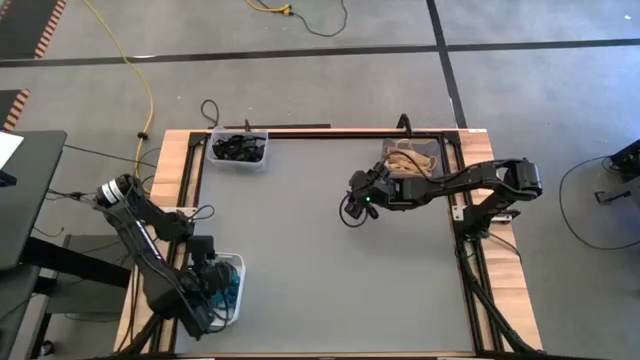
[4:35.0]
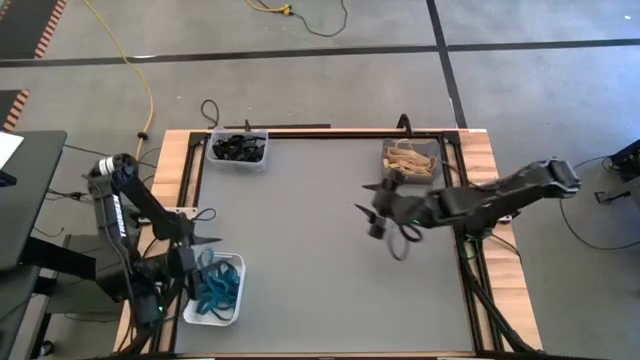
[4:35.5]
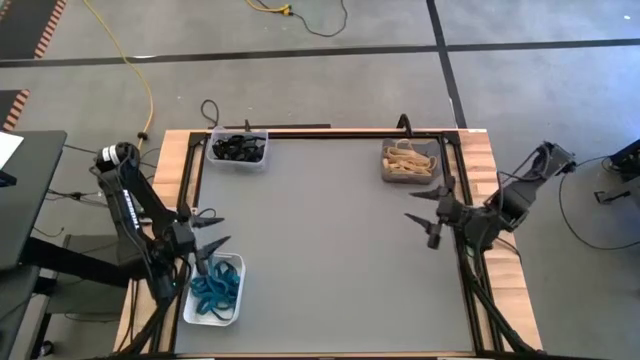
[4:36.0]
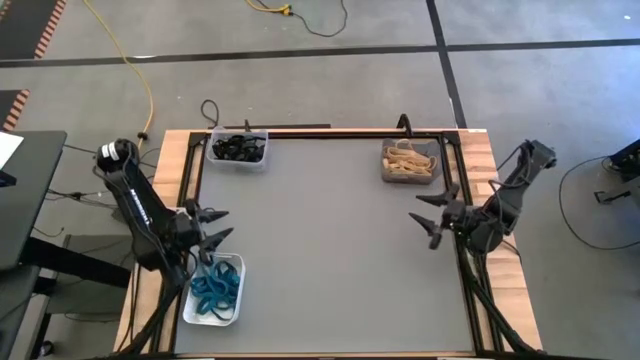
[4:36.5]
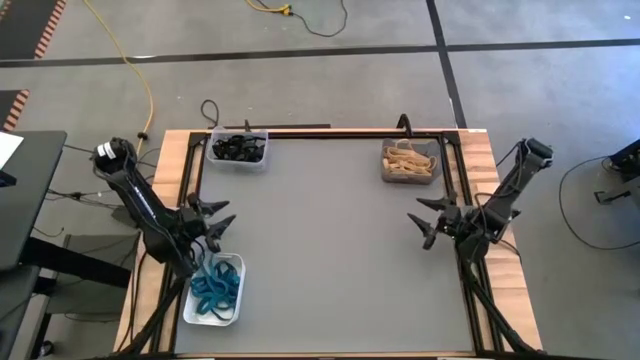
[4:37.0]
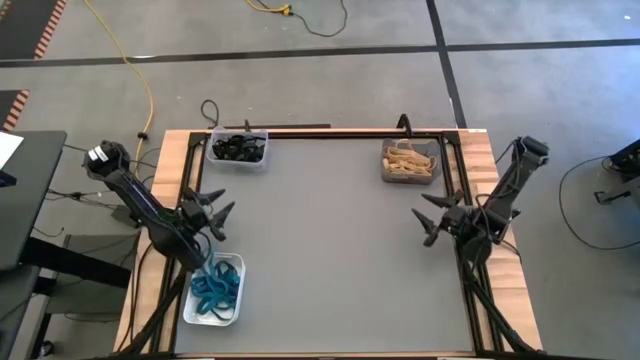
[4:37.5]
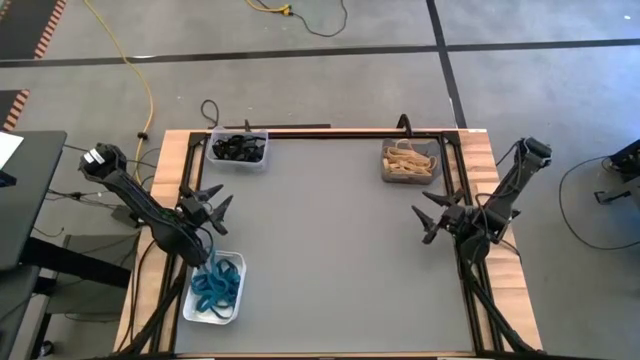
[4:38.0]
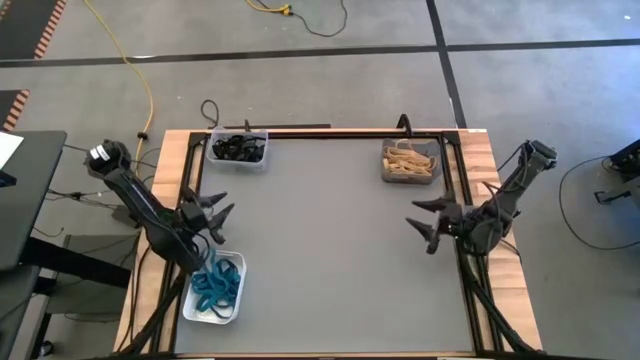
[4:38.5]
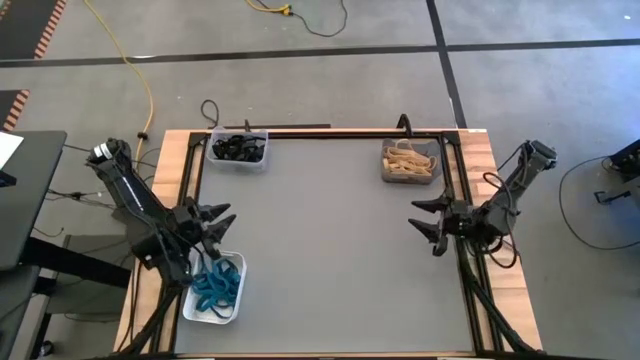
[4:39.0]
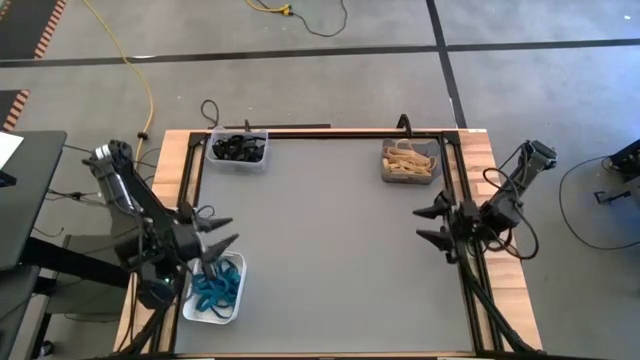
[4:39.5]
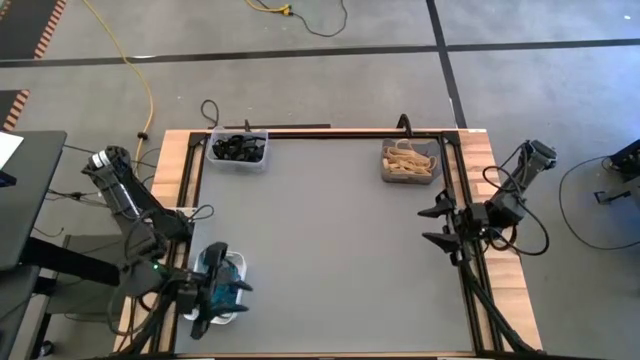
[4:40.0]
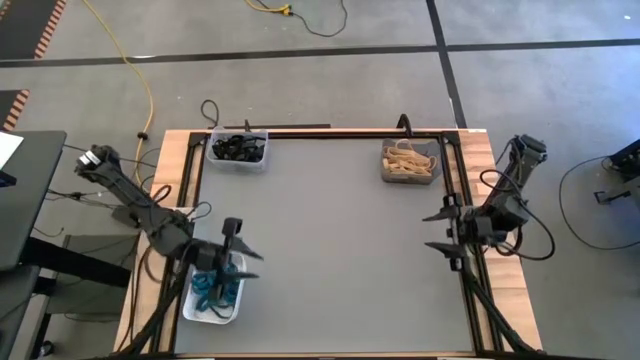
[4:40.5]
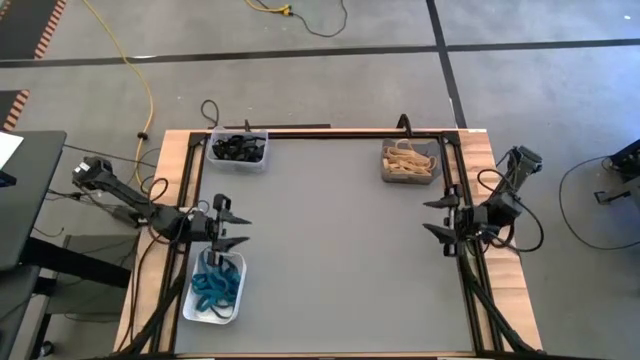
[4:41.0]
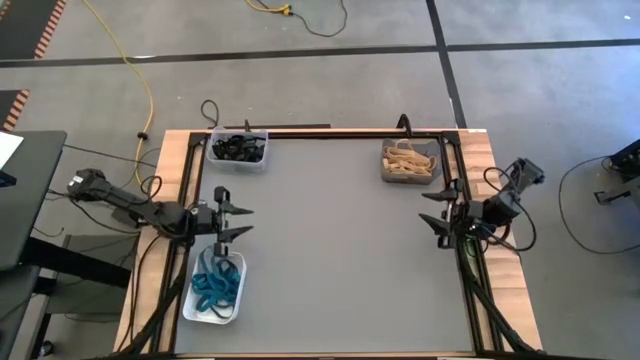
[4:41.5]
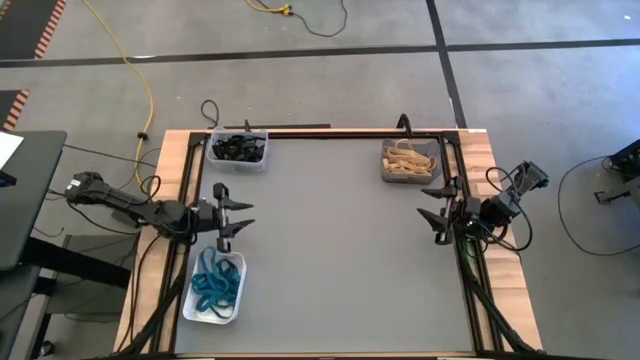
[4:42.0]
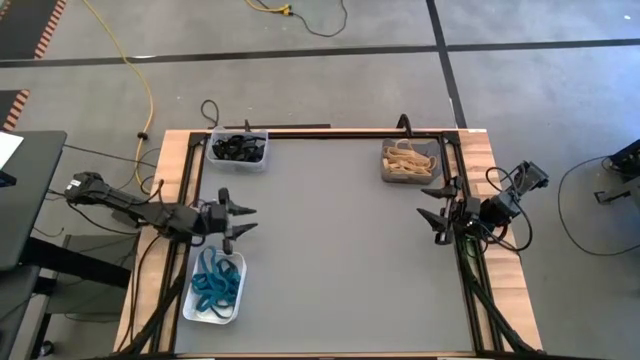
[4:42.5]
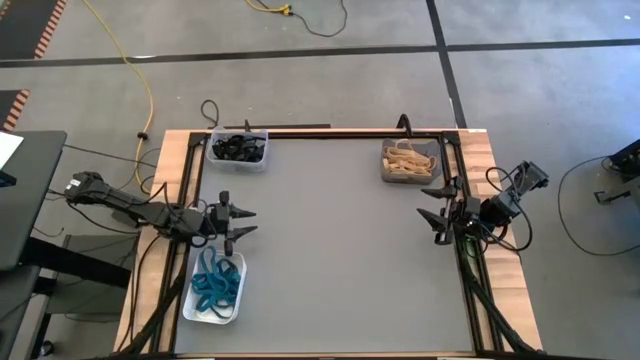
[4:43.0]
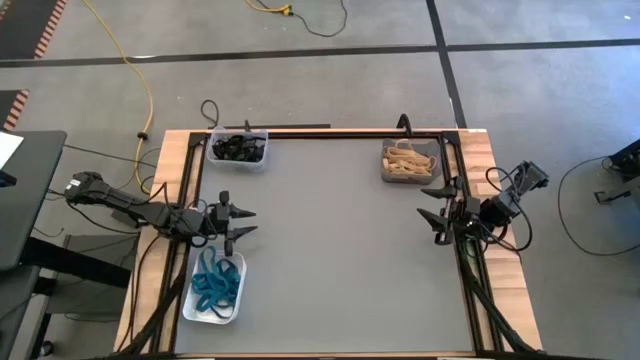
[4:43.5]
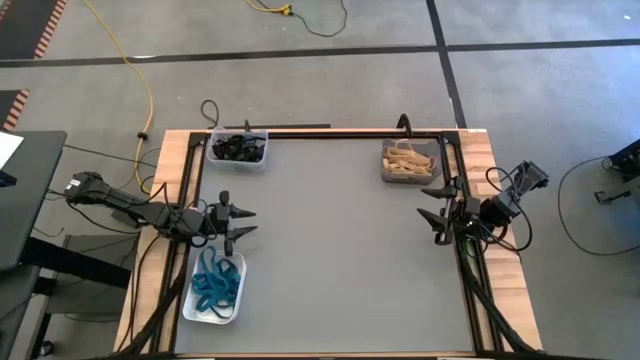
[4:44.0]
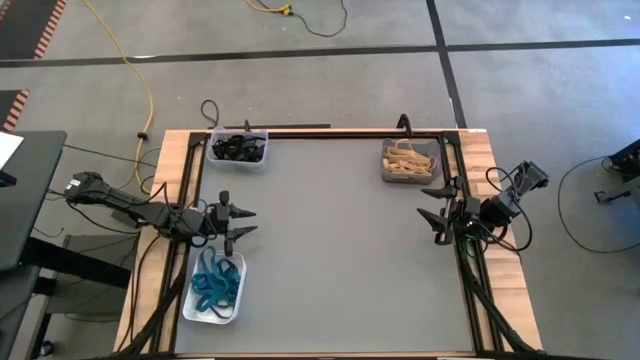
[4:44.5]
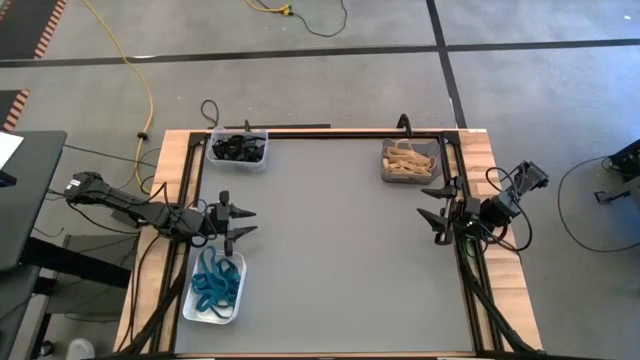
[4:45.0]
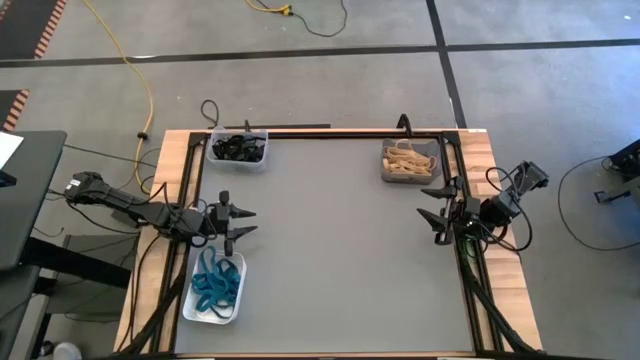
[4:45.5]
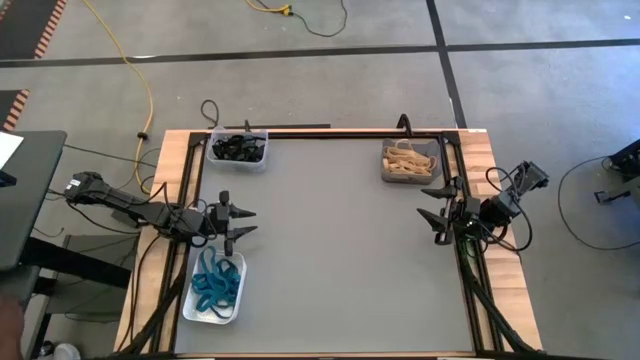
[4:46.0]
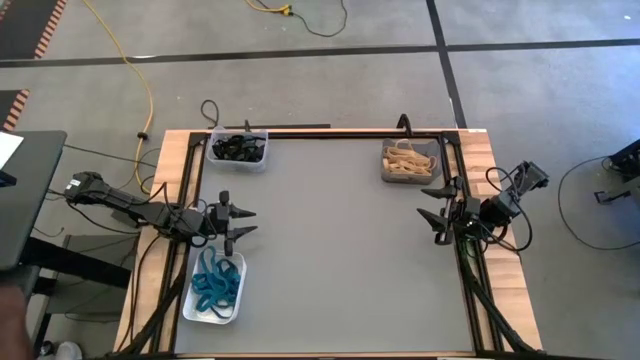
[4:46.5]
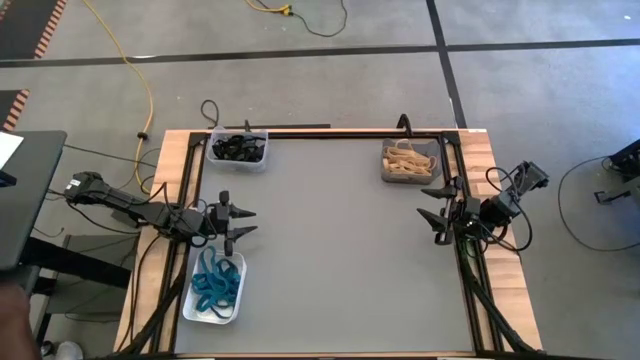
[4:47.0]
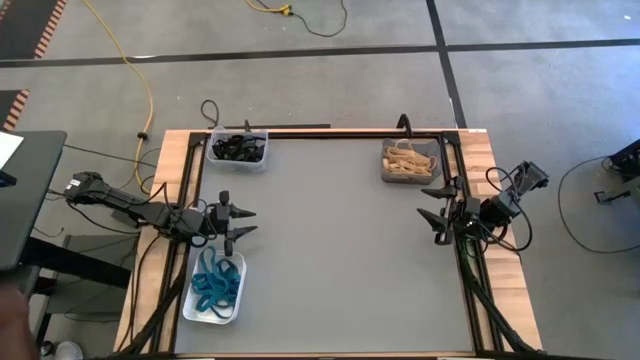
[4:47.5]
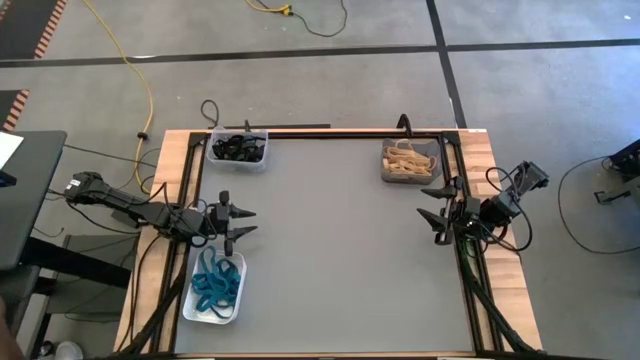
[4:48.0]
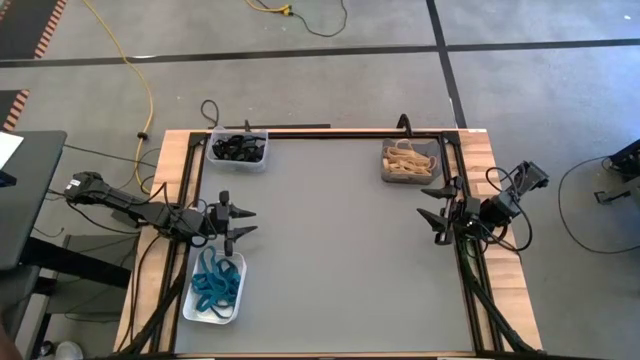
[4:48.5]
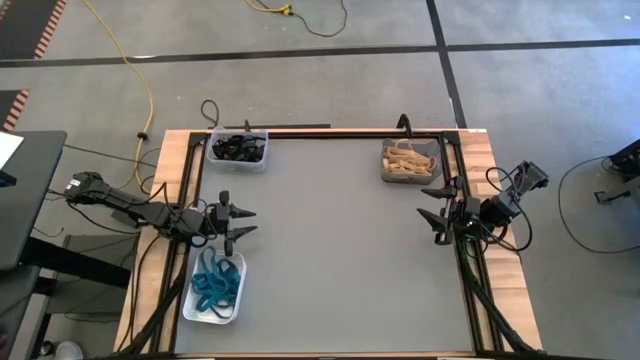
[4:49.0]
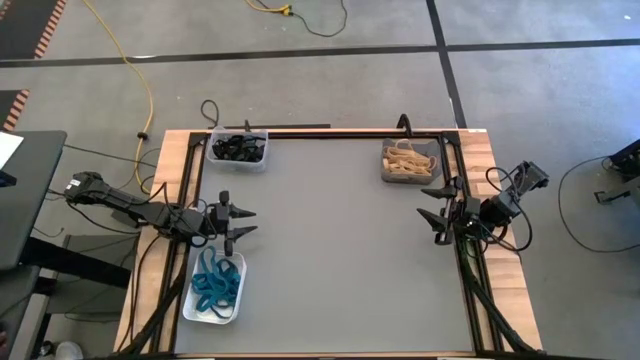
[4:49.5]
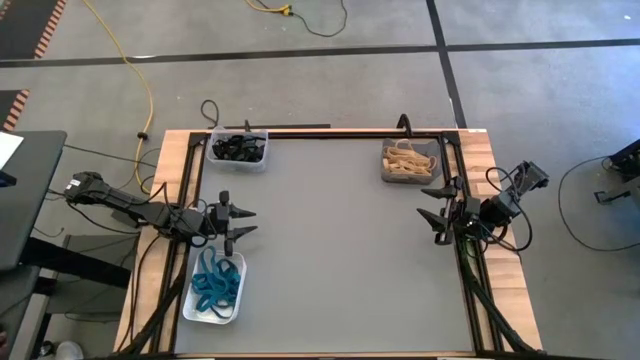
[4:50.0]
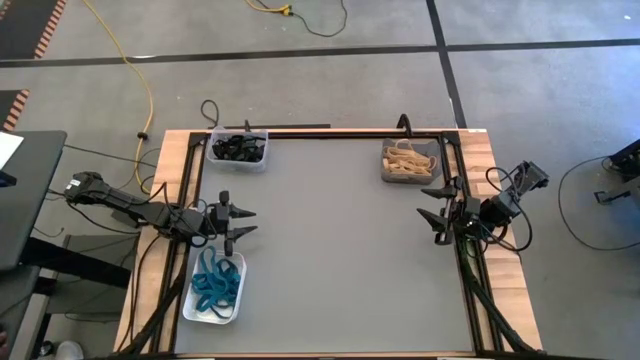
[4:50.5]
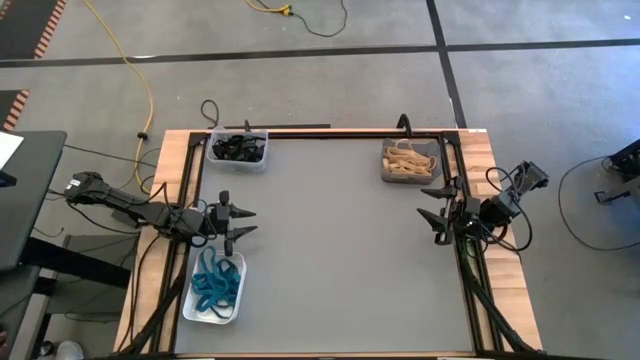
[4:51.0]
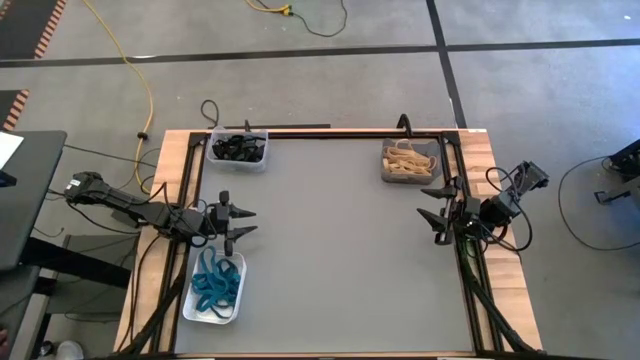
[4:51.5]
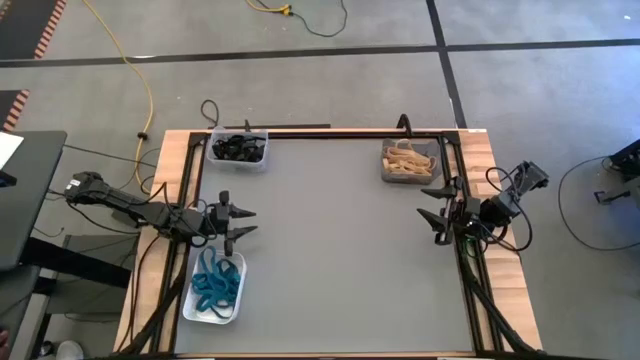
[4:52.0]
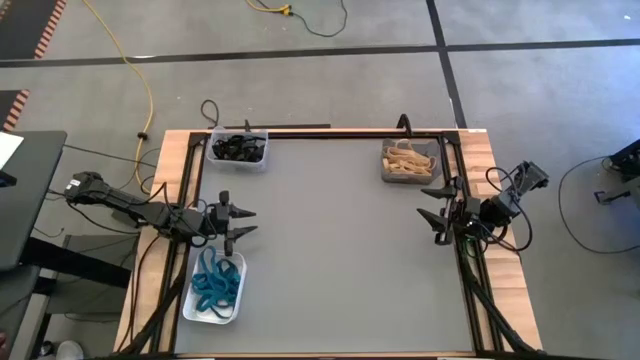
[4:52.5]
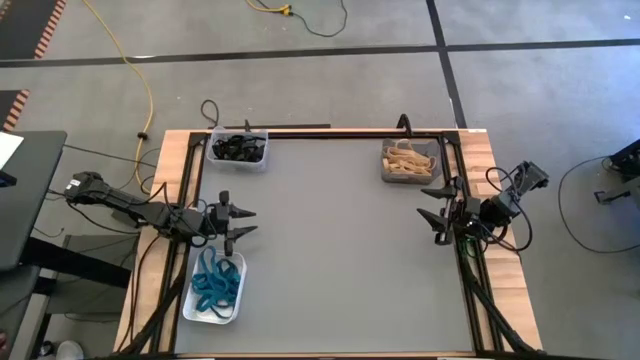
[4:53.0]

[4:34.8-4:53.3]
Task: Sort rubber bands into baskets
Return to Home Position
